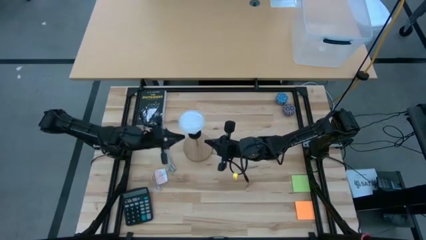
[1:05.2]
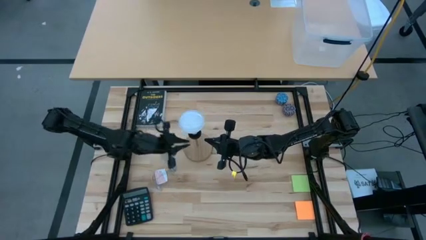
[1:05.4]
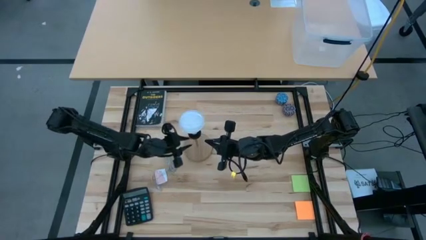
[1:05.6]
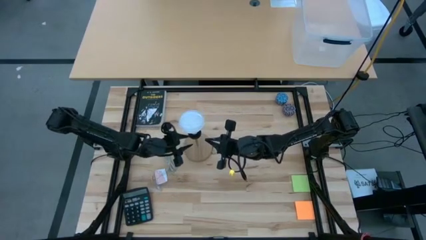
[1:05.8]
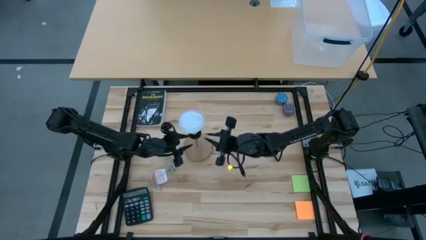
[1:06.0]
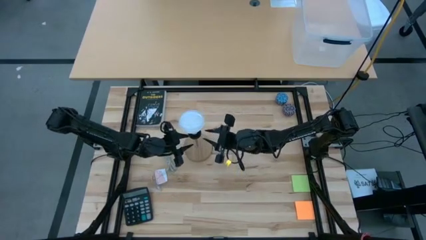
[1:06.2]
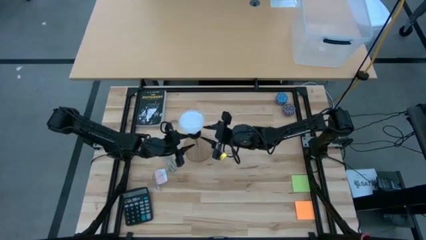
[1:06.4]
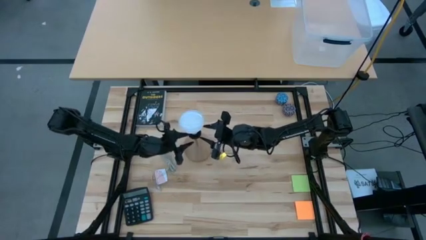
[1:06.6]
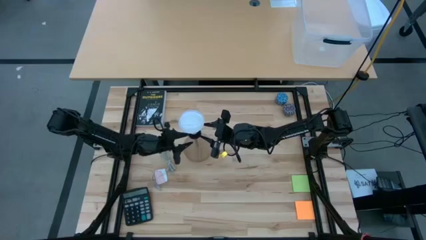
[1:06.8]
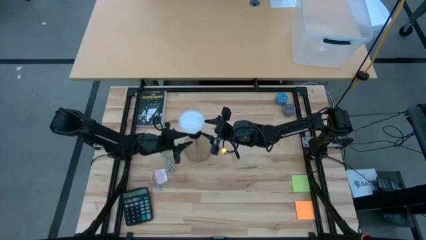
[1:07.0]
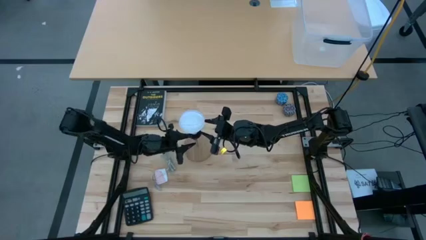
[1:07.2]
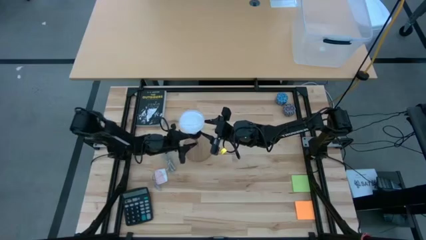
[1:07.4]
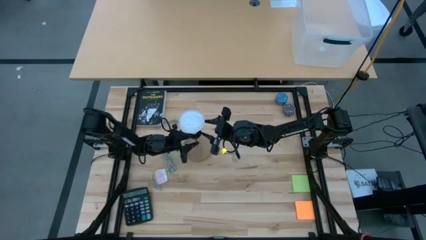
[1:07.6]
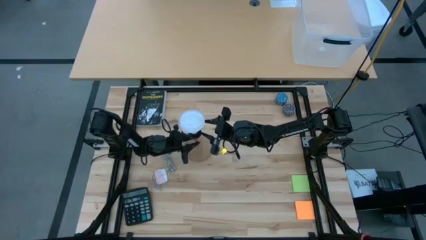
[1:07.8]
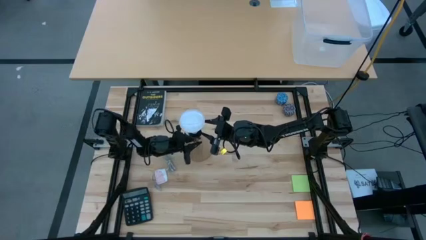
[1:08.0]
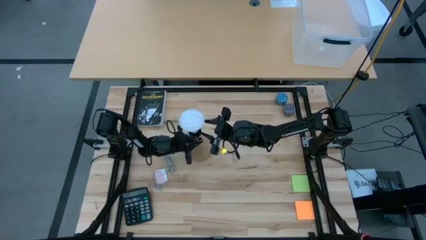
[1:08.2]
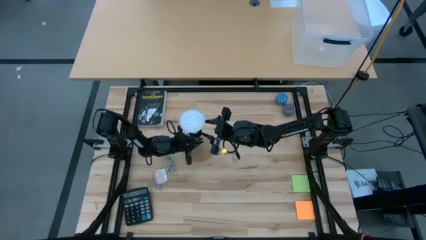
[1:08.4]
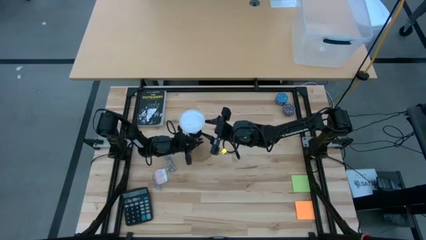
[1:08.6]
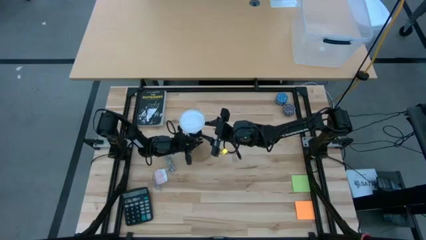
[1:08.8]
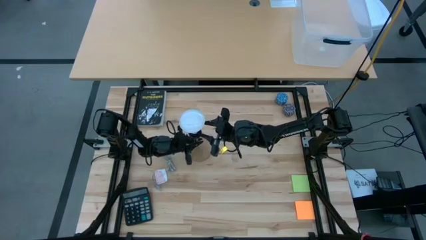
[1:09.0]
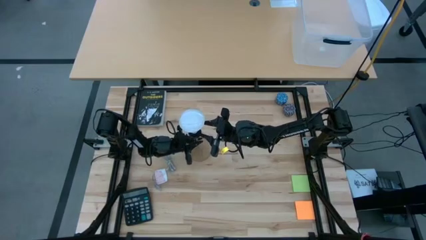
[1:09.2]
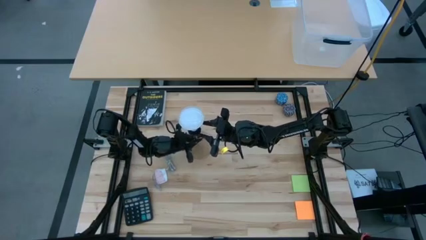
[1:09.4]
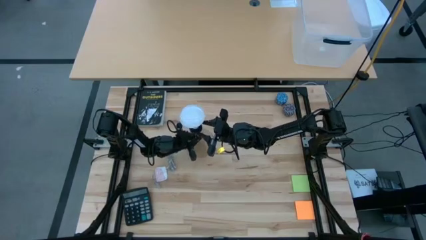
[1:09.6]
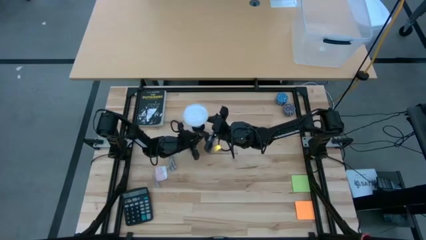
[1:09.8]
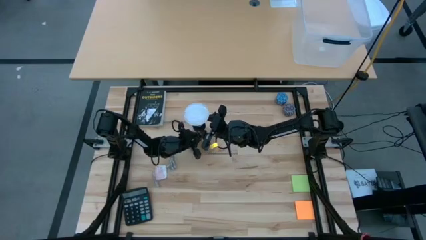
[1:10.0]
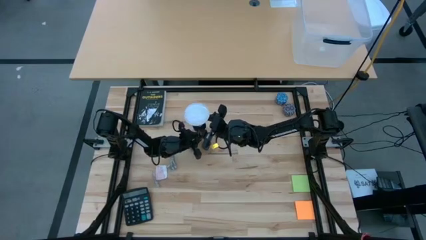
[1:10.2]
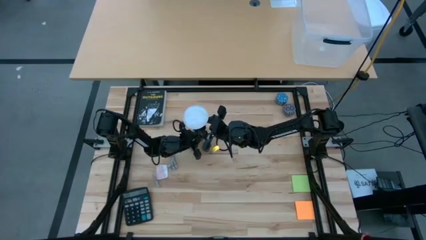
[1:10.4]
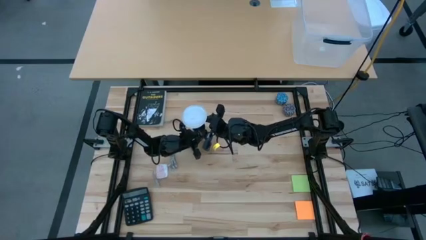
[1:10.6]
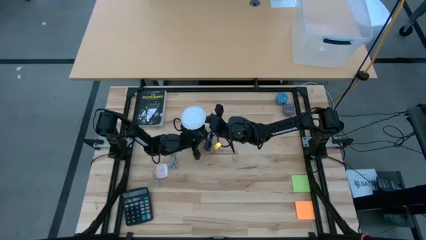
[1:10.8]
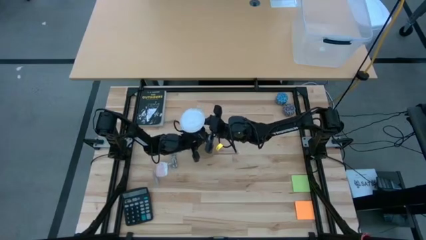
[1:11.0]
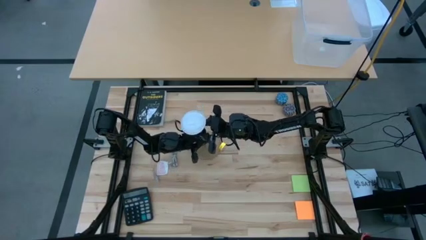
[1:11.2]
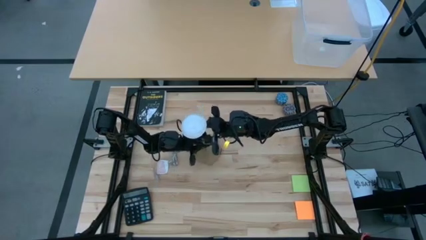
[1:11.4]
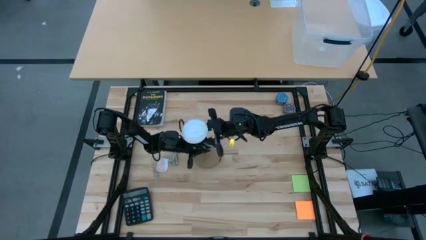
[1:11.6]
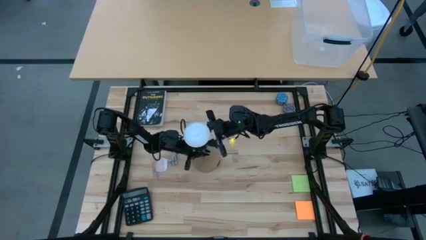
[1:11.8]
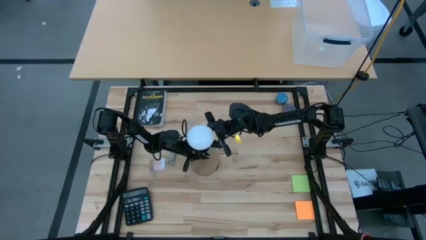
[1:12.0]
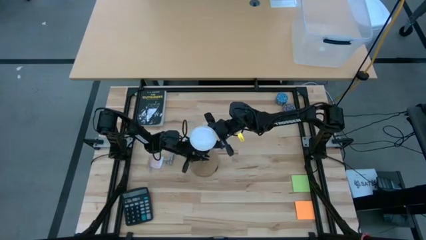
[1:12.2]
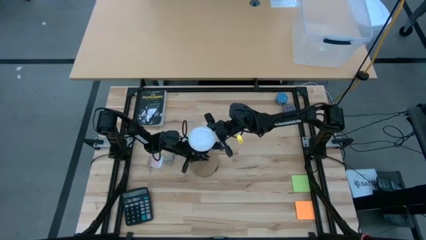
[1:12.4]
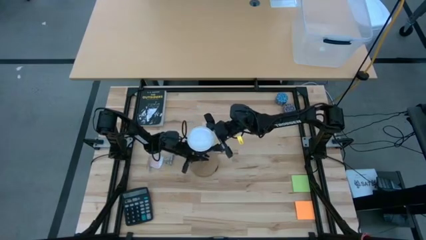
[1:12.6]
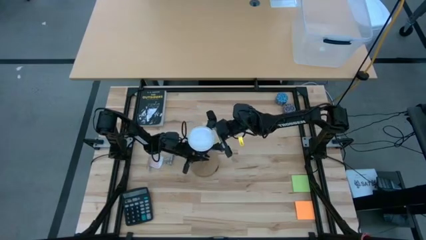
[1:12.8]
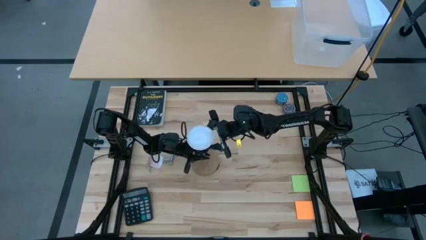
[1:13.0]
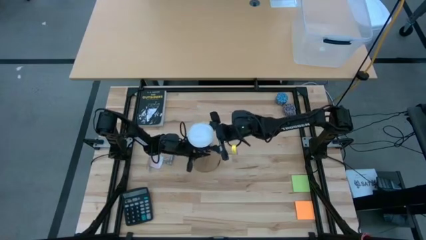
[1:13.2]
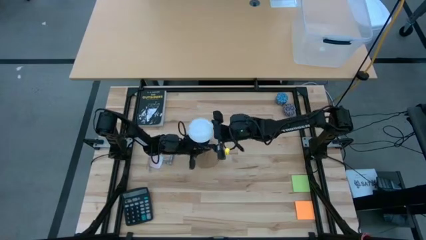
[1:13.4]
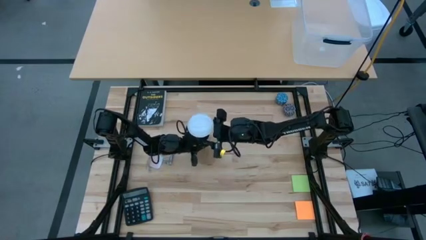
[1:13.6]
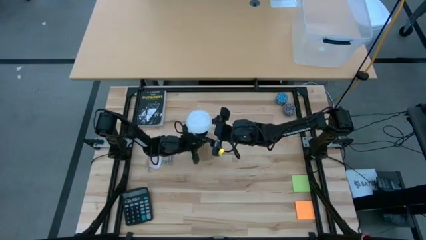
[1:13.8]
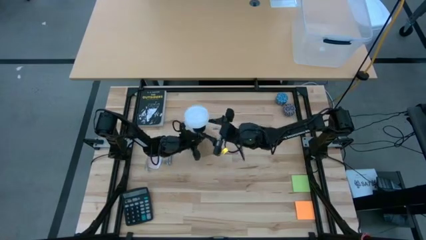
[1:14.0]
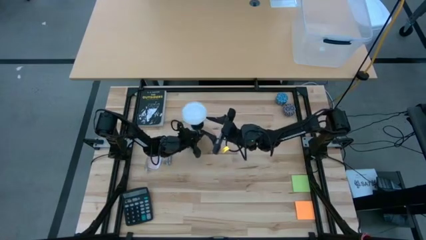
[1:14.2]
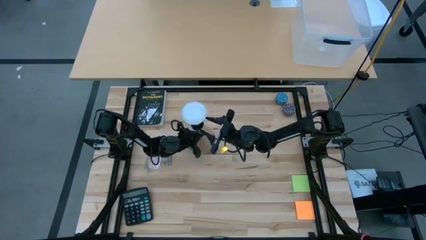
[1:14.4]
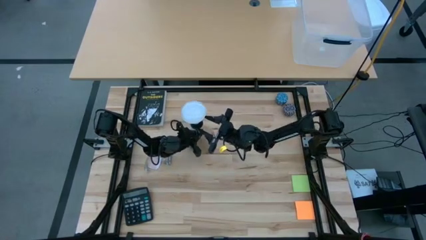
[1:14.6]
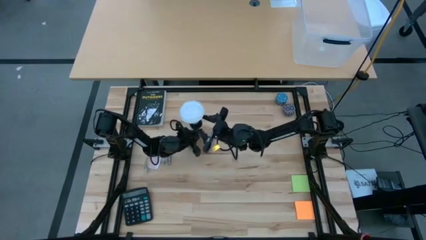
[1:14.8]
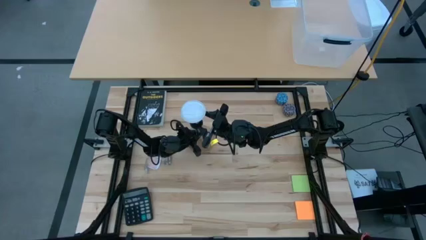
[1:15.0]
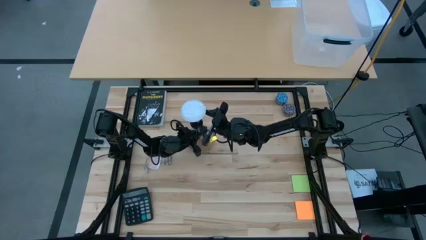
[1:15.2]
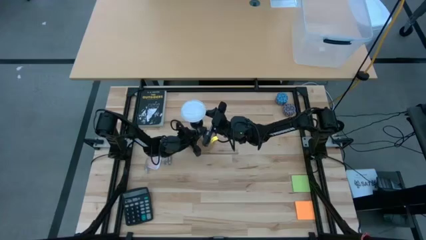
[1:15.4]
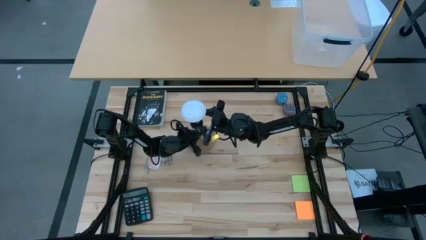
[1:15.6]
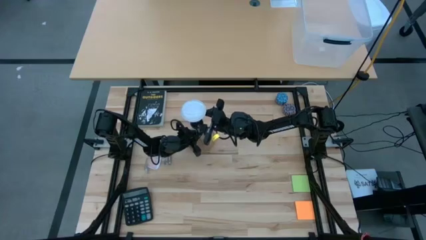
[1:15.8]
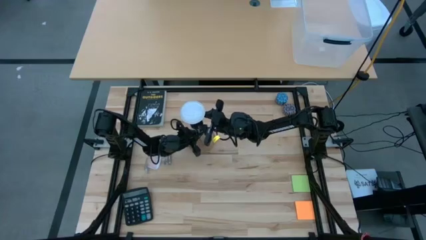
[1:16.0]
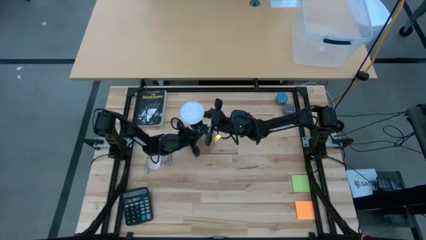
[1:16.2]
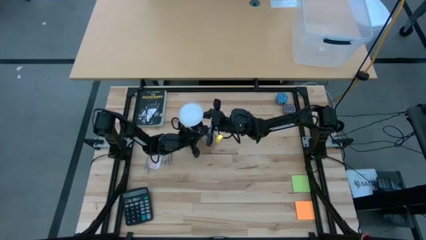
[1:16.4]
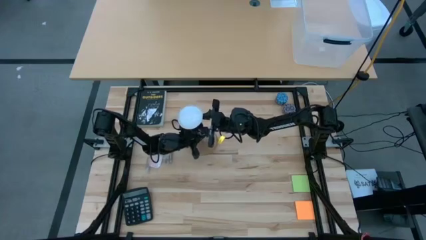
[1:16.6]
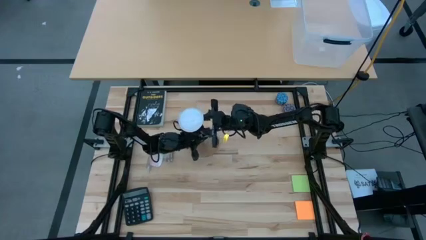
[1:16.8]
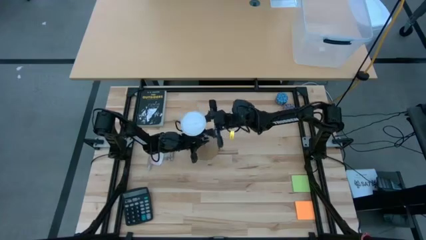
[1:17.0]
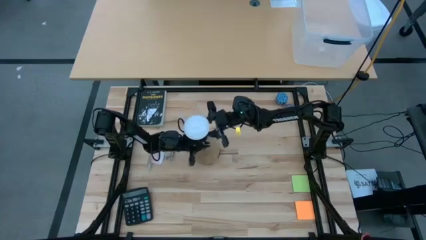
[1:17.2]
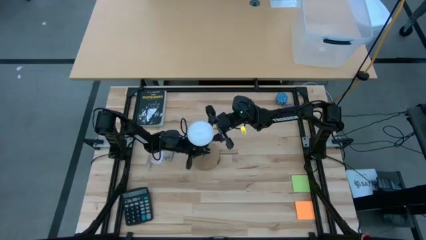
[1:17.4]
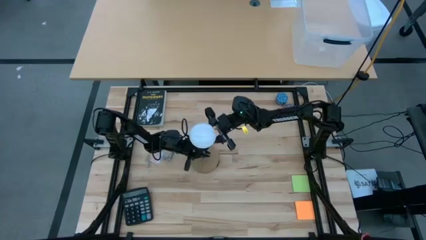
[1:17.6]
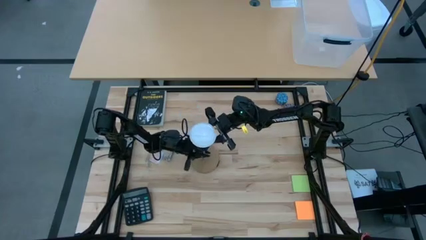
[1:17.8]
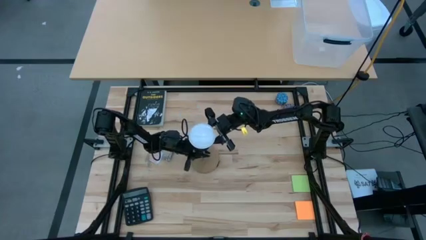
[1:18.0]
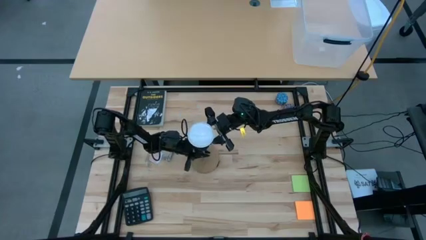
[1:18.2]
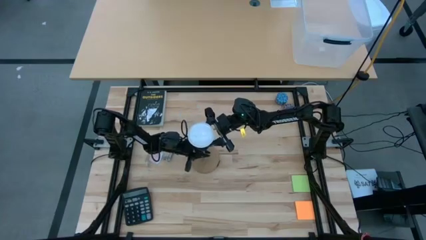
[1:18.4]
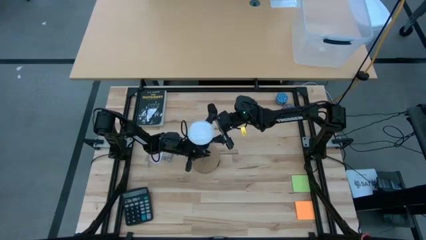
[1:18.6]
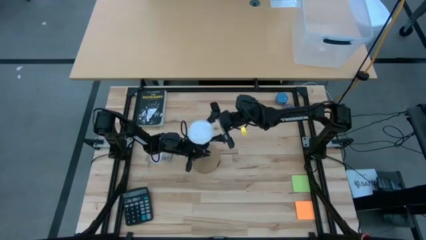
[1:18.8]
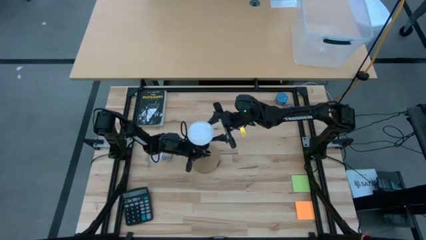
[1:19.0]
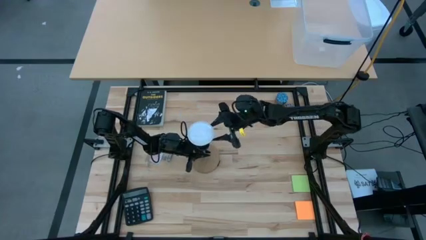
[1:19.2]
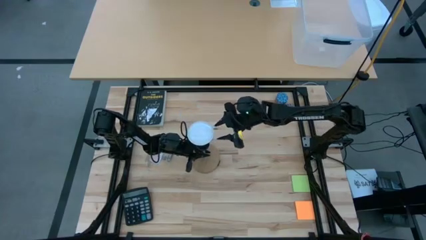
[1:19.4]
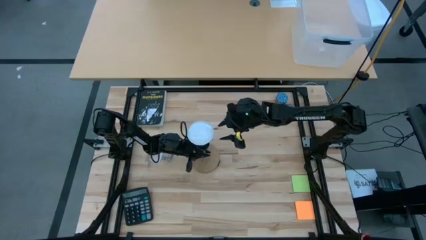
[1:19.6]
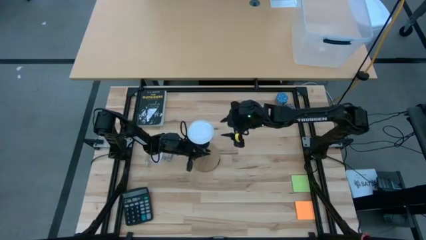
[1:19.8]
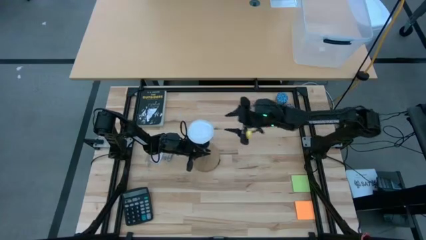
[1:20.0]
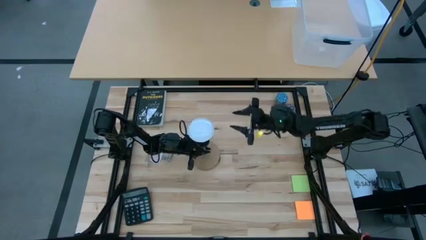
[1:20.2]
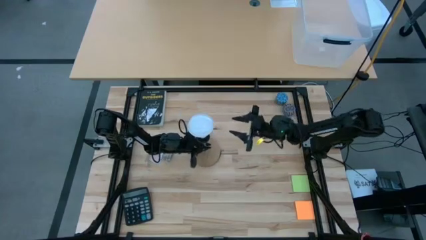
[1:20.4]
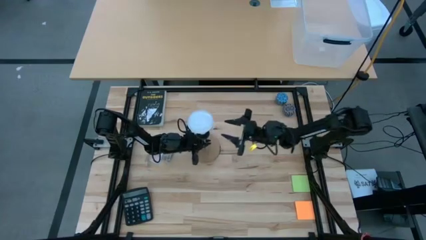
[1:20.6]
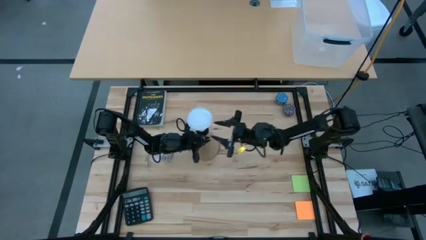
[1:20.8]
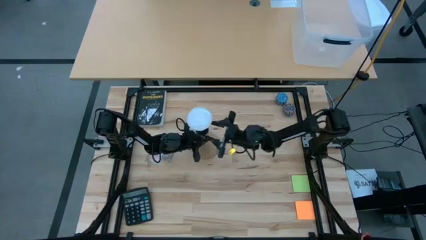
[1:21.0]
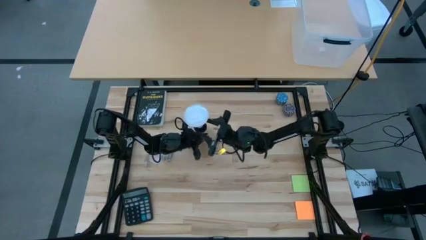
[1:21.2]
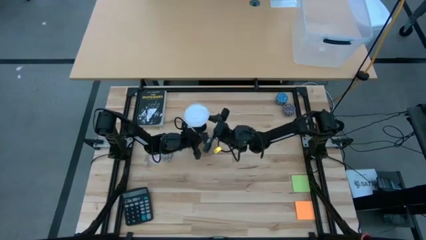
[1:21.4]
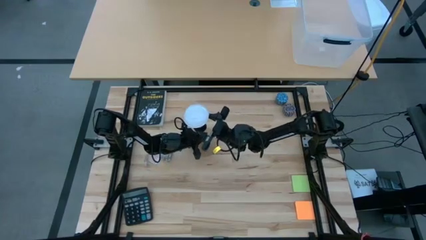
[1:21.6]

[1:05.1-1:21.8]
Task: Screw lightbulb
Remove the lightbulb from the lamp socket
